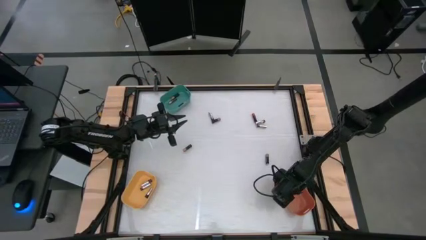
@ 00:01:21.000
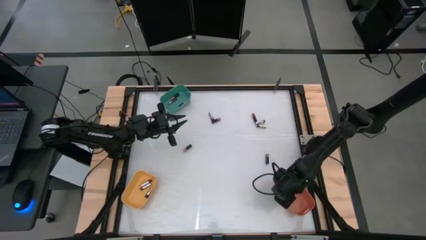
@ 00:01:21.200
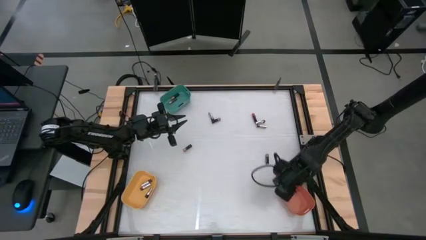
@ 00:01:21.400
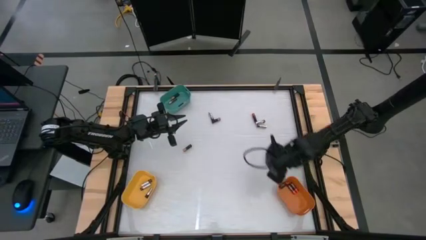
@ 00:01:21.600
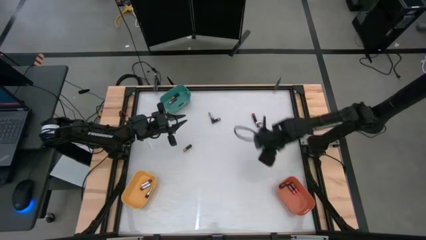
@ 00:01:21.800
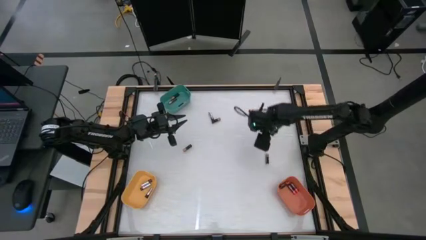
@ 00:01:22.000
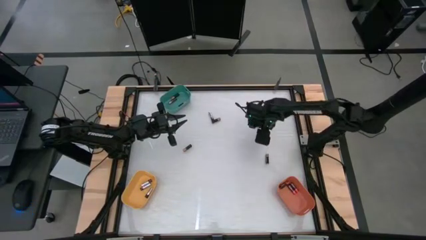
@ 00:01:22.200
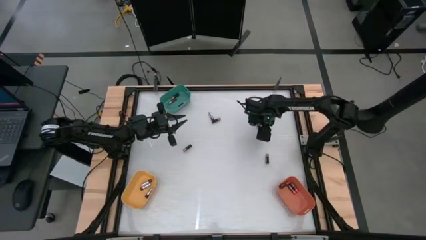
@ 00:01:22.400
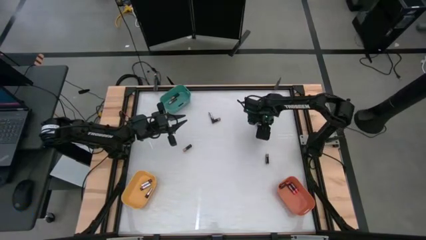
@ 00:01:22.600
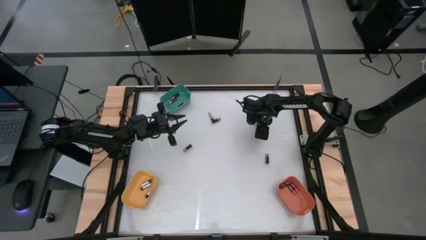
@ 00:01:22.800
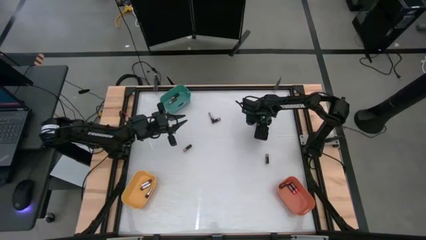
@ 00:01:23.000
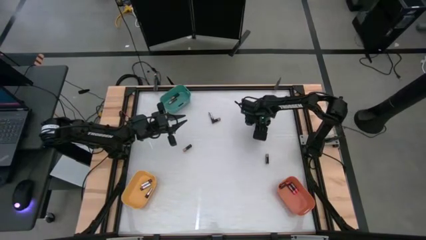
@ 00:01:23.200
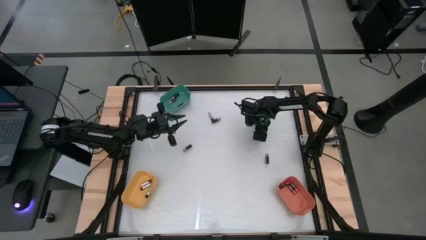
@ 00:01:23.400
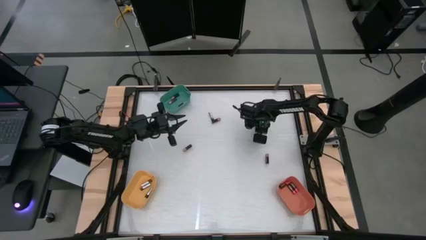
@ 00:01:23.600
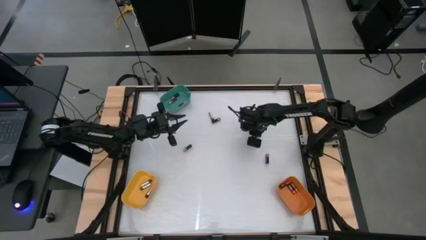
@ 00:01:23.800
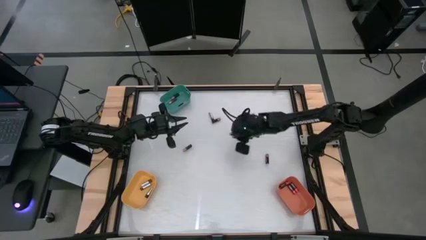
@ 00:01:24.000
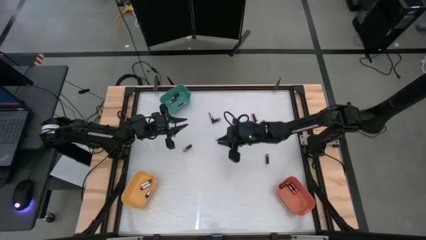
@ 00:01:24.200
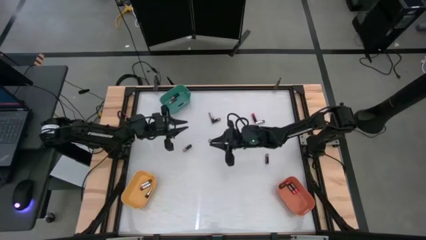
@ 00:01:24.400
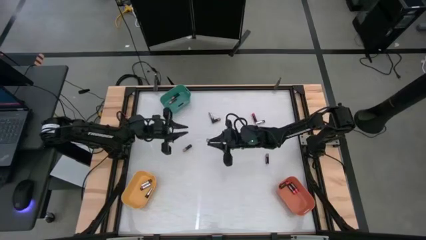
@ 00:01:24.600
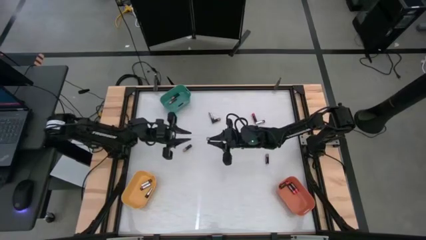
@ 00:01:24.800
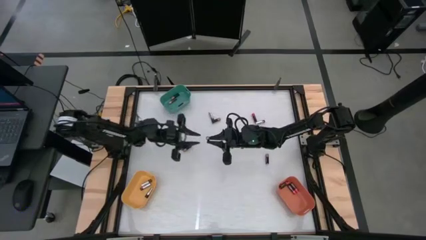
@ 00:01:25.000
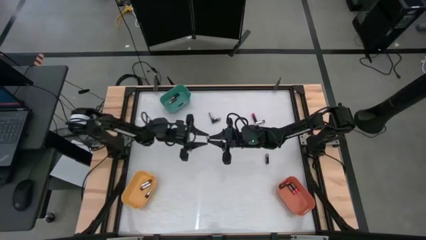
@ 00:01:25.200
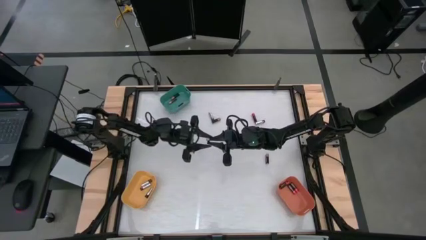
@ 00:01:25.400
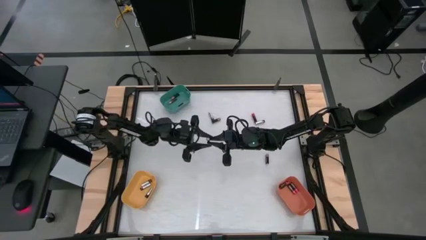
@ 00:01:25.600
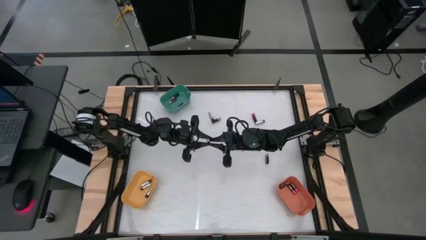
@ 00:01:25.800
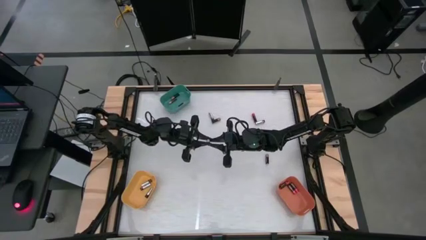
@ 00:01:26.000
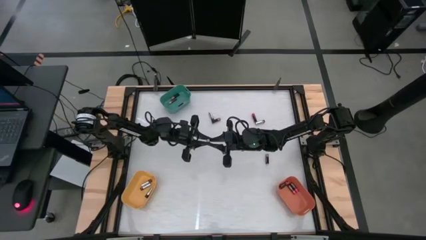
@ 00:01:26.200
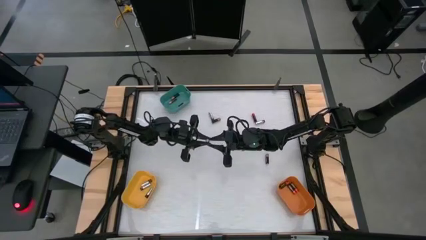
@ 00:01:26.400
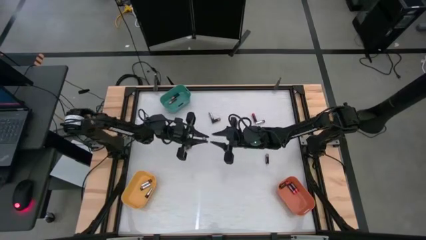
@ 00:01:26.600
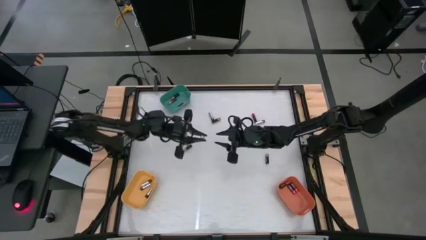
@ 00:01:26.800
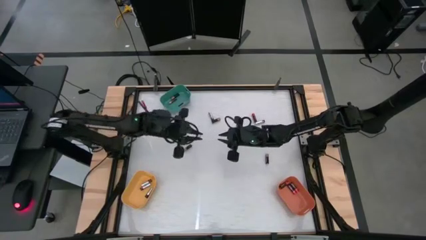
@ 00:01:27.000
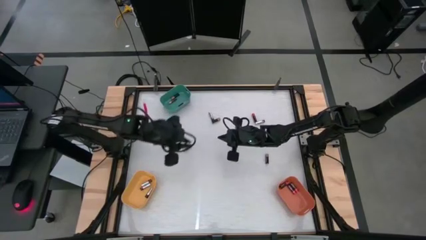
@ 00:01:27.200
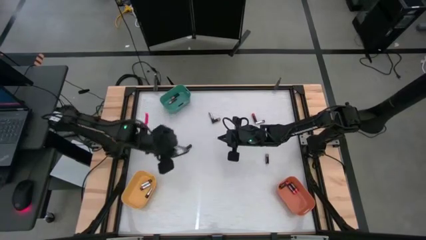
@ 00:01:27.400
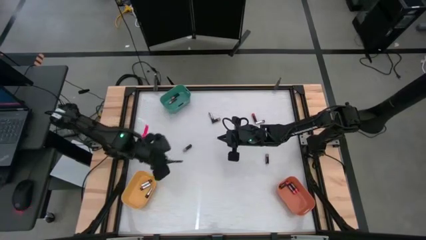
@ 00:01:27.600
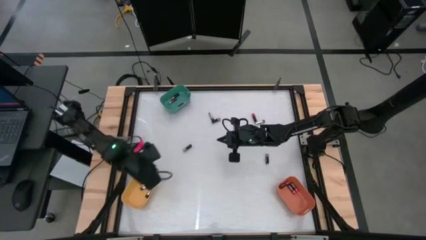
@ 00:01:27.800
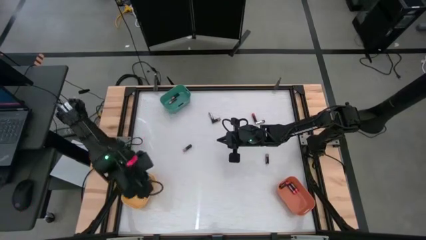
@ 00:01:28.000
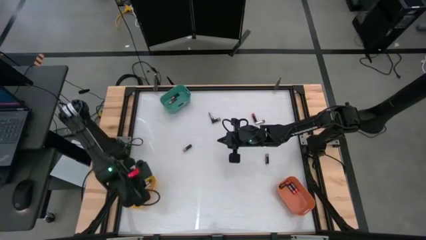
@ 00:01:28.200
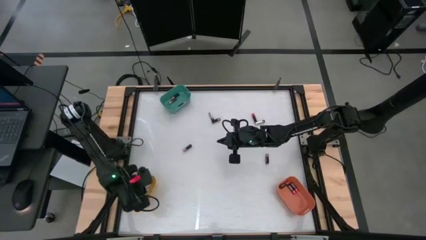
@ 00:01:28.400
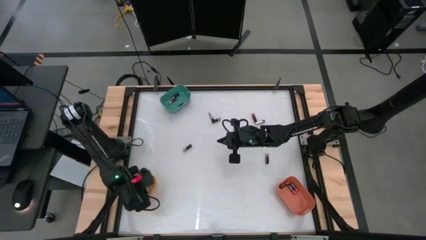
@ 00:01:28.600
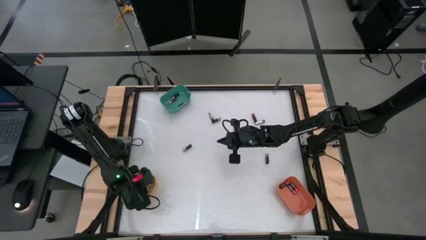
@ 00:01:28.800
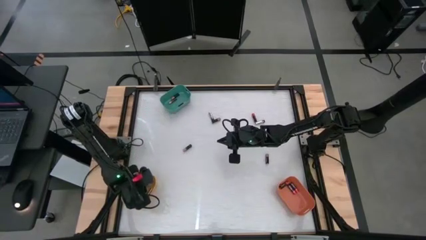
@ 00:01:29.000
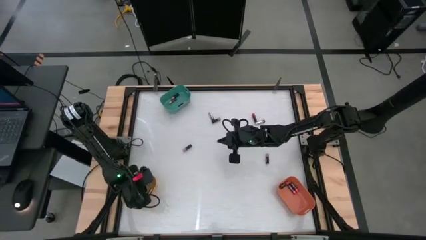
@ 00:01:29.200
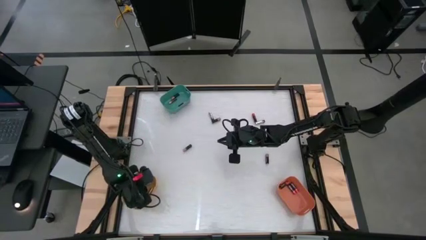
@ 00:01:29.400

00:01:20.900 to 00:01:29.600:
Task: Sort batteries
Put the silver battery into the yellow bin

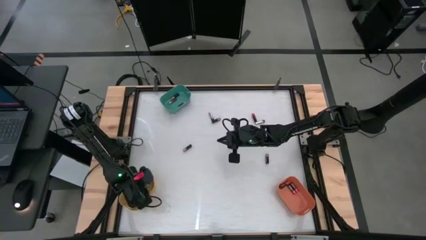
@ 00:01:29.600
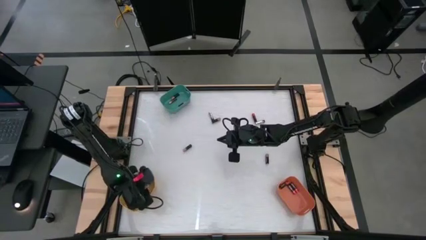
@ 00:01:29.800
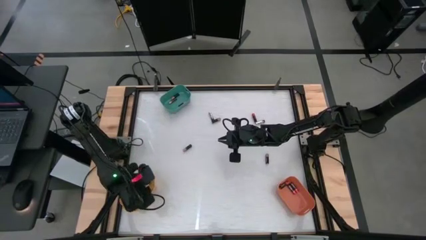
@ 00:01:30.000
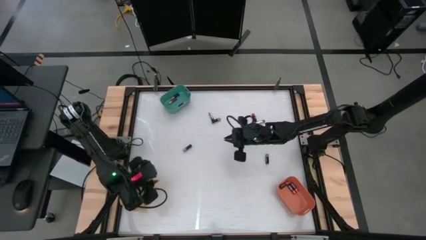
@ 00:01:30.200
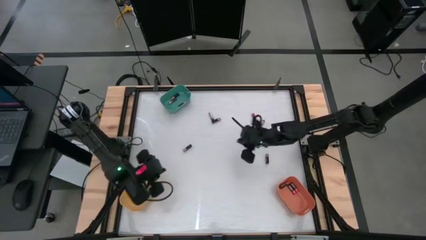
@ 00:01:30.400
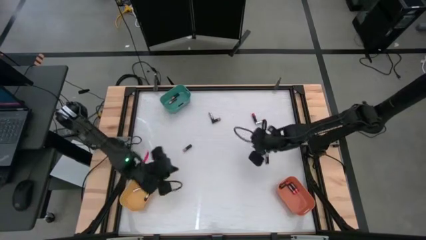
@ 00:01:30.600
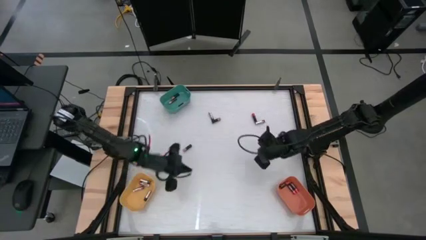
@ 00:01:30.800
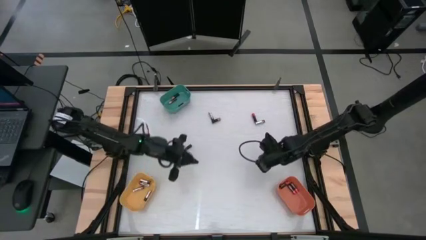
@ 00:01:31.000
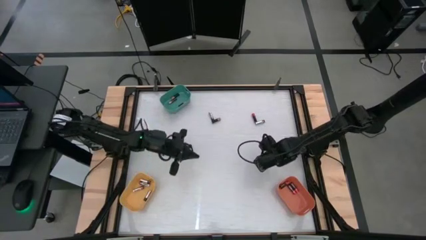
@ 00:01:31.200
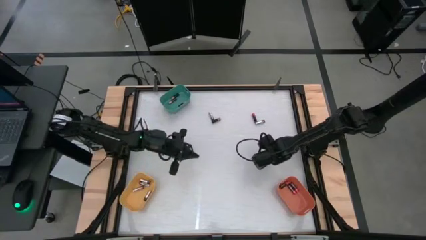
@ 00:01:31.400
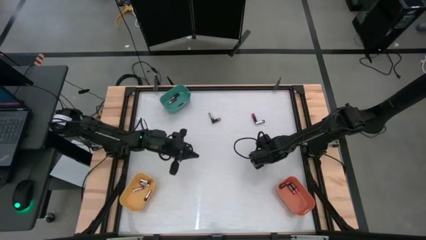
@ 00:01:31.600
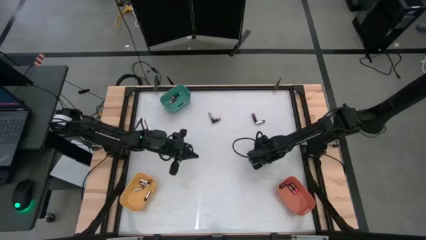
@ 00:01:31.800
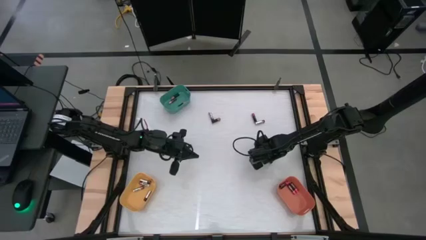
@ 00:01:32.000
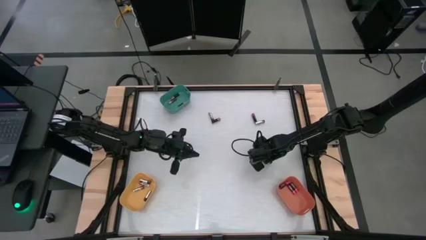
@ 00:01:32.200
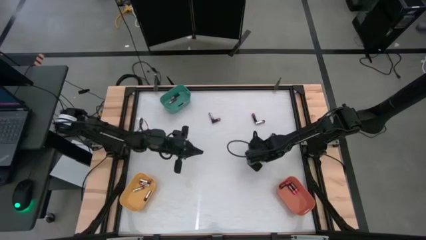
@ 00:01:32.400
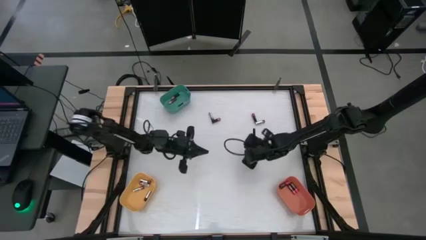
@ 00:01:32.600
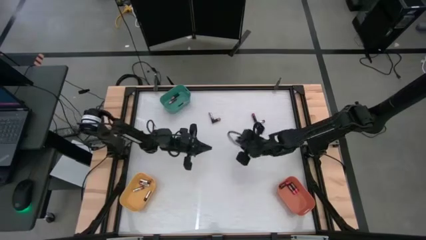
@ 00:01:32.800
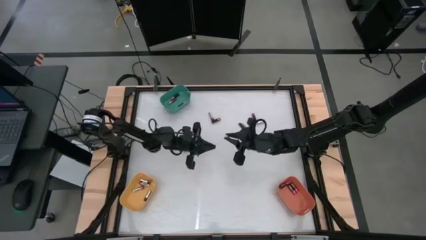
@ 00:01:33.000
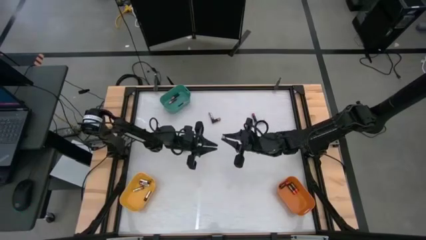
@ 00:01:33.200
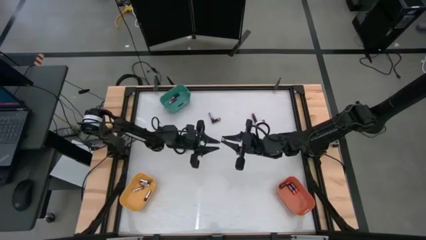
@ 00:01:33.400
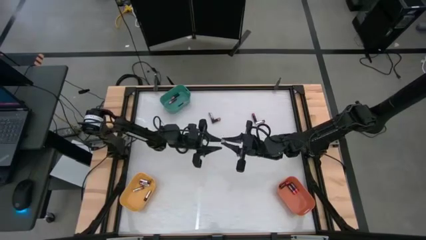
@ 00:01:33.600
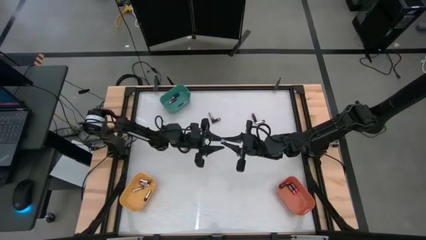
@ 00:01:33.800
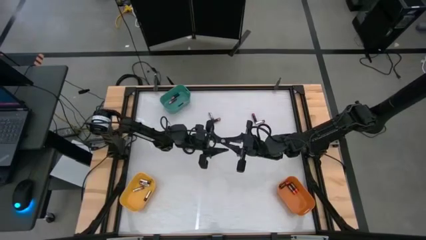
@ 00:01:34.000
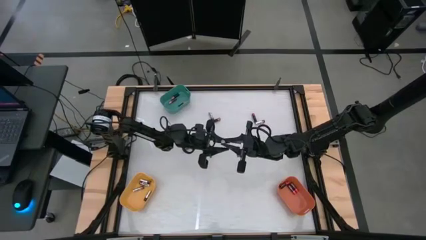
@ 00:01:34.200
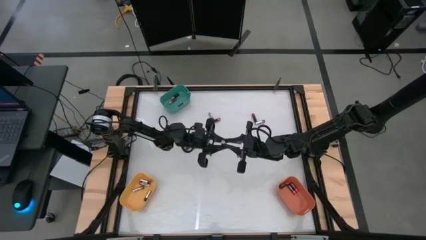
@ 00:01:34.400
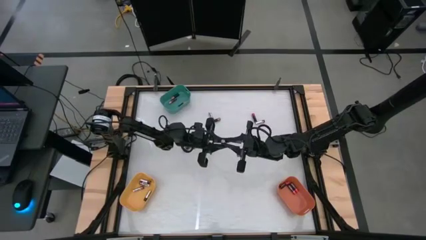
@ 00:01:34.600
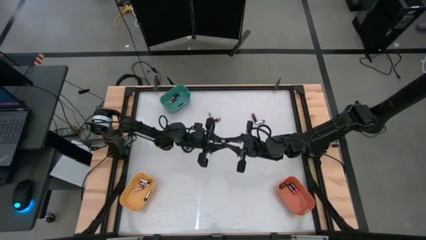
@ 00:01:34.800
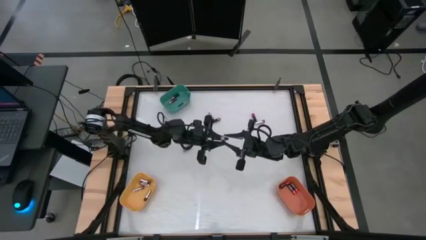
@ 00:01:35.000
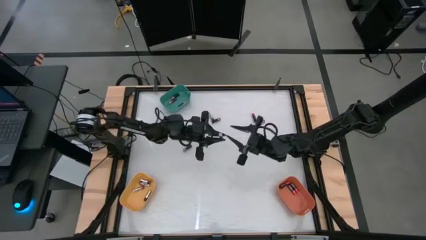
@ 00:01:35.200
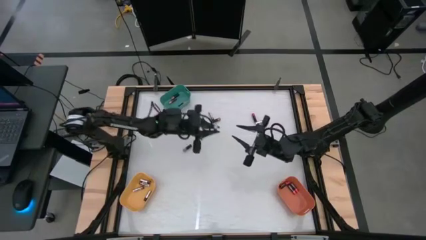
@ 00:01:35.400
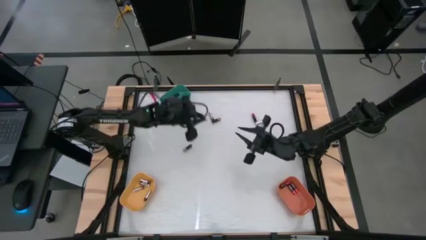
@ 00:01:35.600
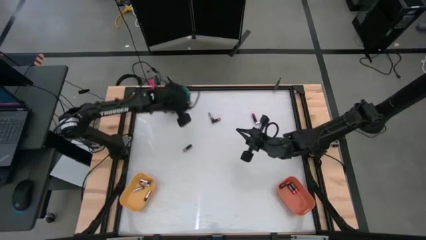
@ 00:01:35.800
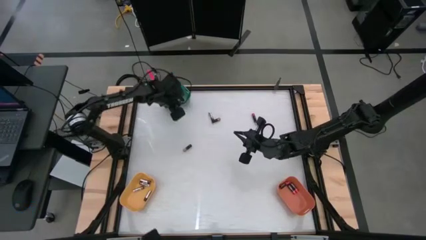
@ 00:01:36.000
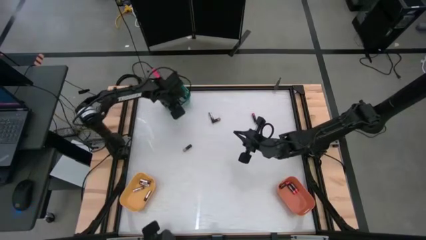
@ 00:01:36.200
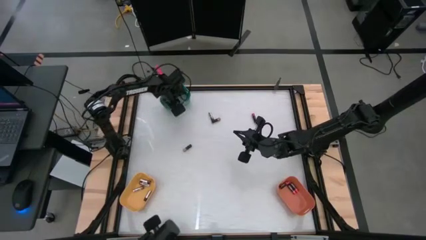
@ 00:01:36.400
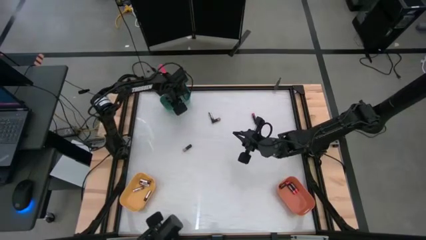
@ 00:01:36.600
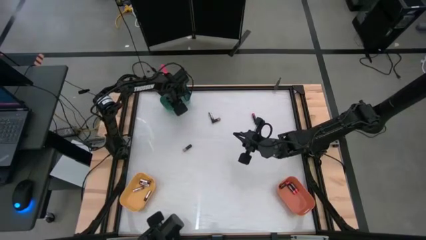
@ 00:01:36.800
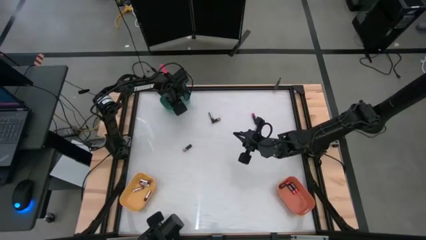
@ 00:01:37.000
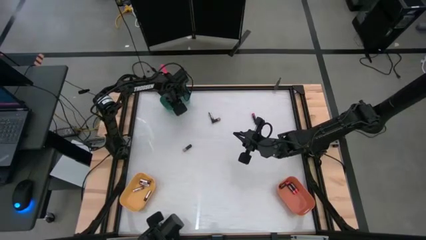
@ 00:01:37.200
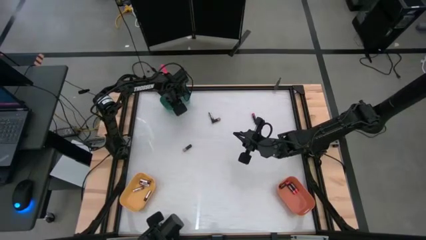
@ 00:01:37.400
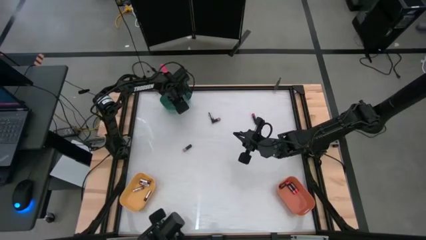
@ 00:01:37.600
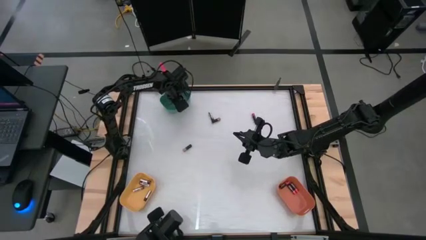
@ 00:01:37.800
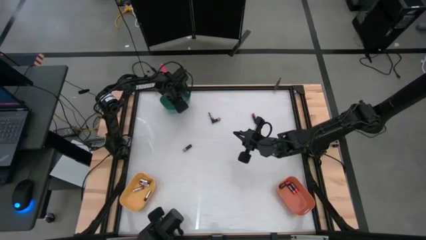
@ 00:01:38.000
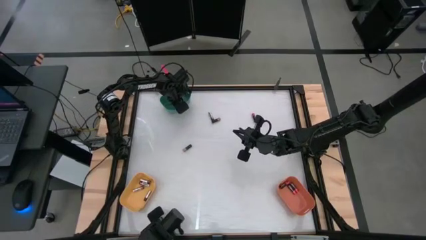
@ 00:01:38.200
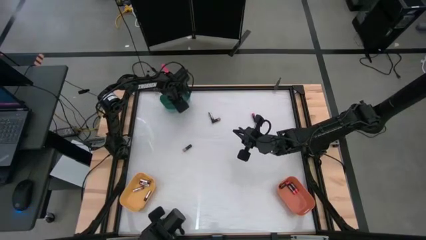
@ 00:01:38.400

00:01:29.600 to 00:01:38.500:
Put the brown battery into the green bin
